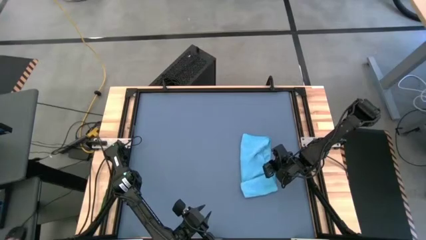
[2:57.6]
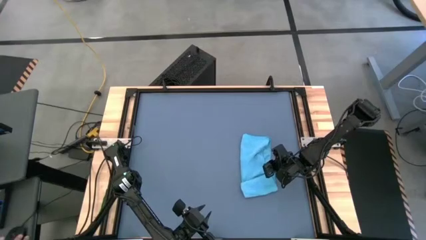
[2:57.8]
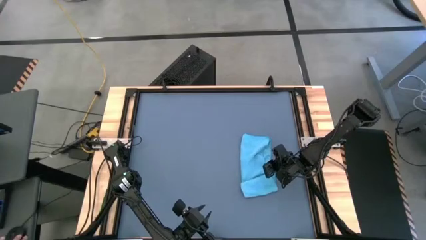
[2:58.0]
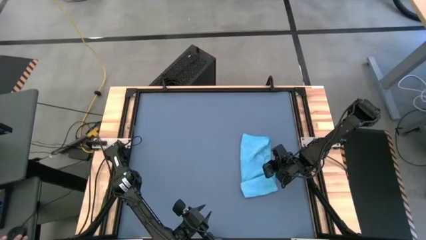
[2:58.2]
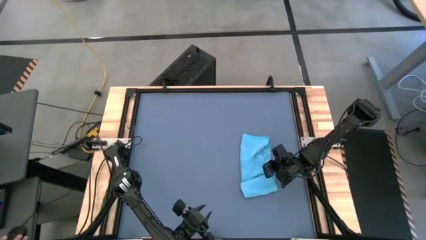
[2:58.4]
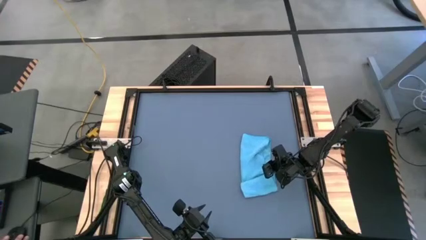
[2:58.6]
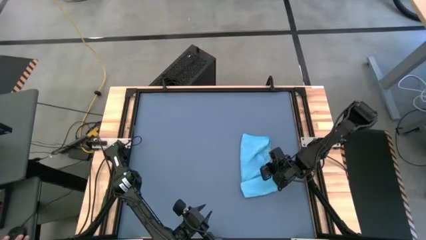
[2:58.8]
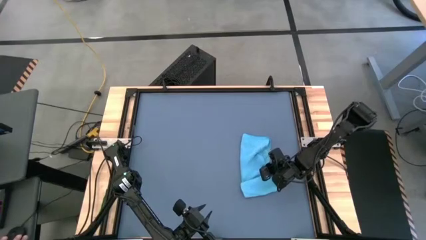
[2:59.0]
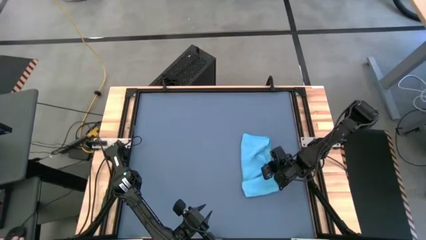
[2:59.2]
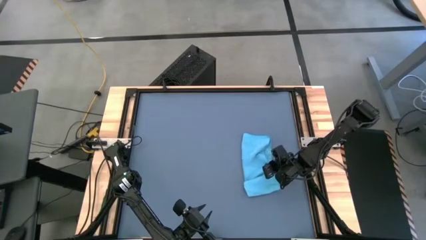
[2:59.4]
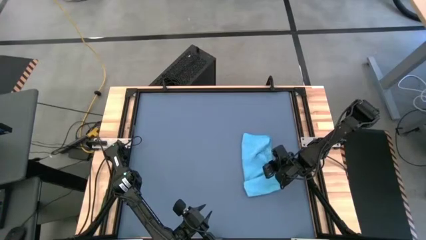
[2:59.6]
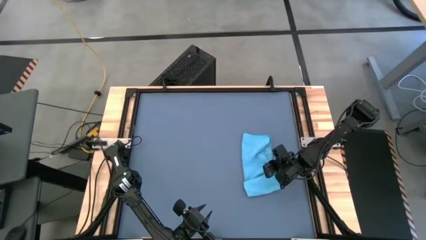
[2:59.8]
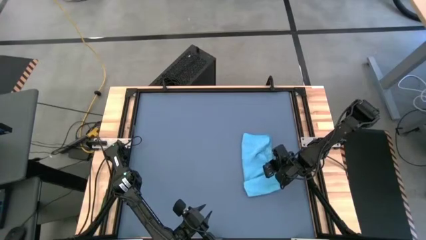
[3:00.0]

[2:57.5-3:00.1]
Task: Roll towel
Roll the blue microfiber towel

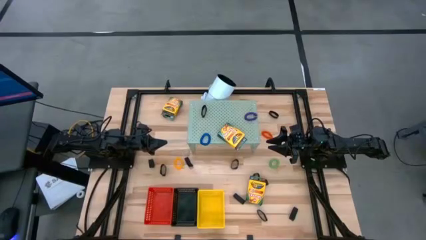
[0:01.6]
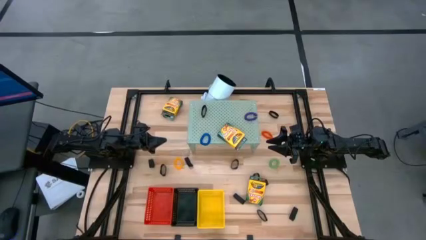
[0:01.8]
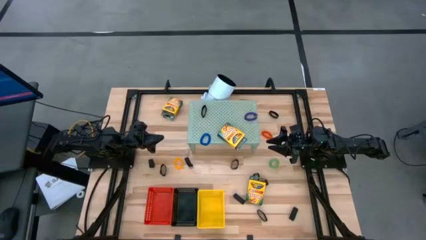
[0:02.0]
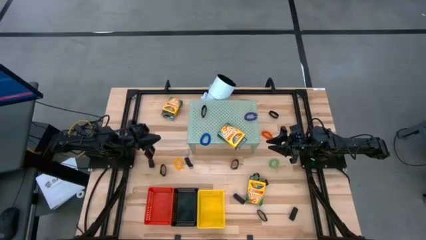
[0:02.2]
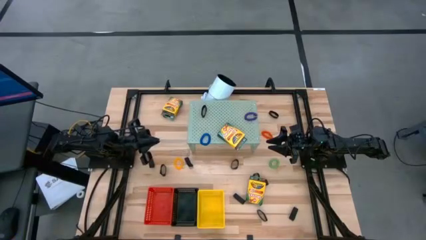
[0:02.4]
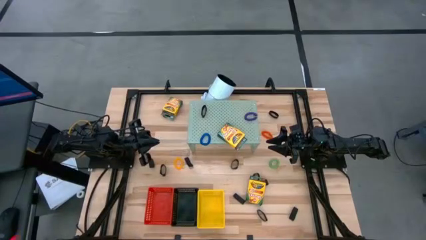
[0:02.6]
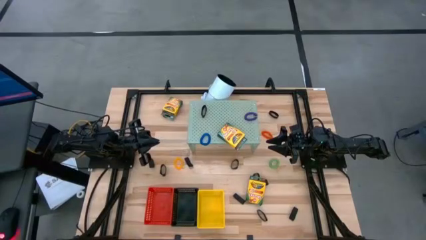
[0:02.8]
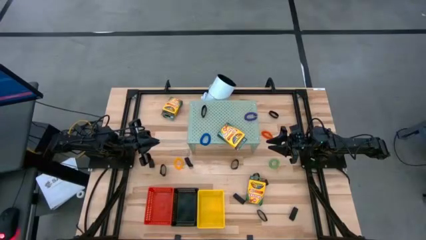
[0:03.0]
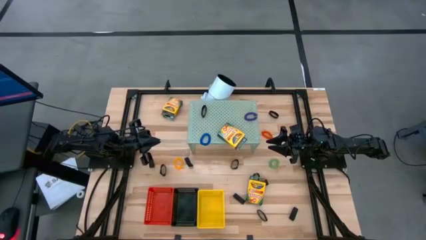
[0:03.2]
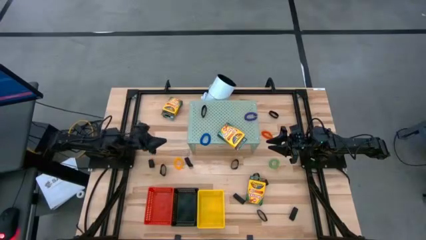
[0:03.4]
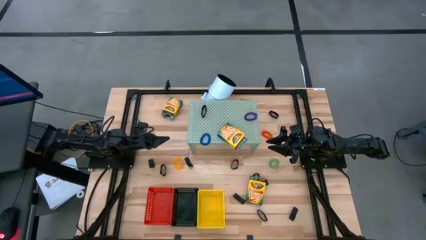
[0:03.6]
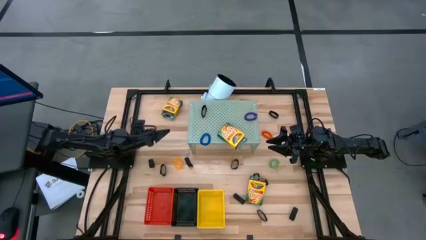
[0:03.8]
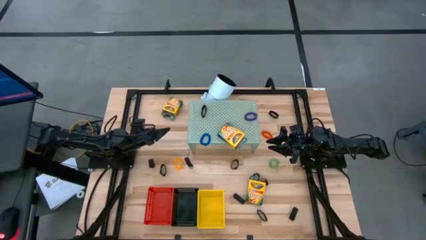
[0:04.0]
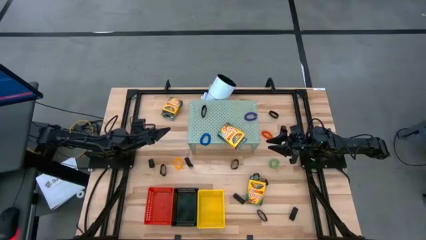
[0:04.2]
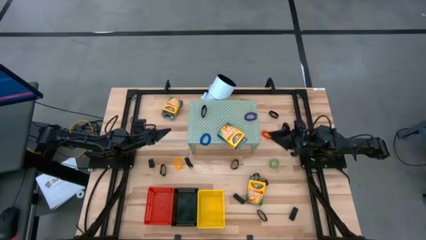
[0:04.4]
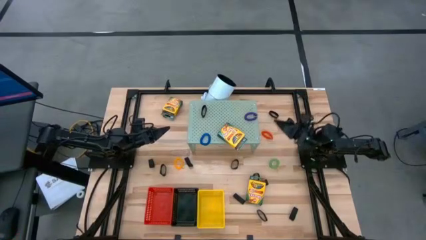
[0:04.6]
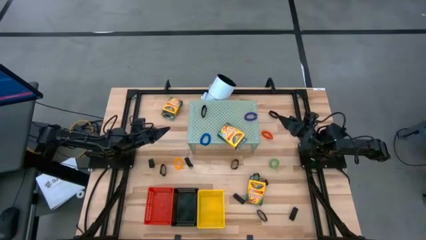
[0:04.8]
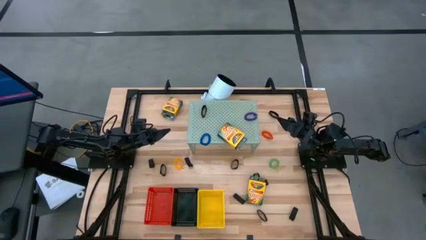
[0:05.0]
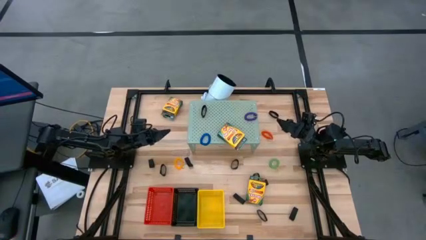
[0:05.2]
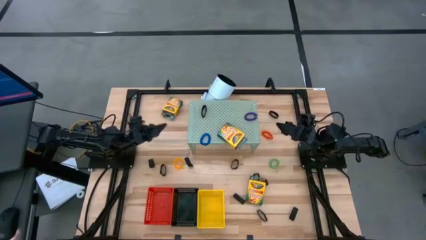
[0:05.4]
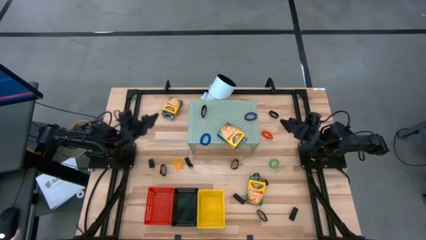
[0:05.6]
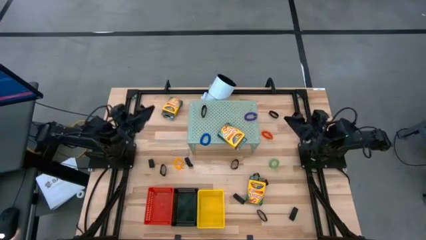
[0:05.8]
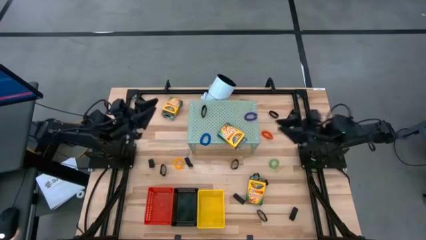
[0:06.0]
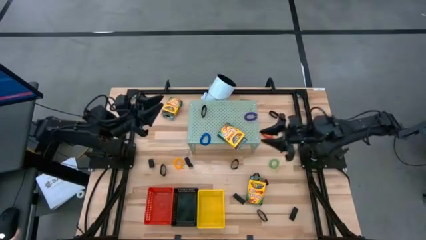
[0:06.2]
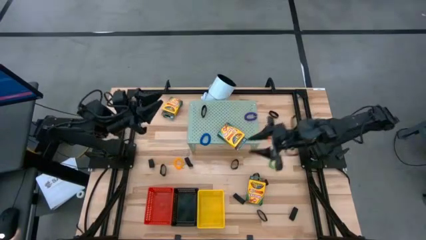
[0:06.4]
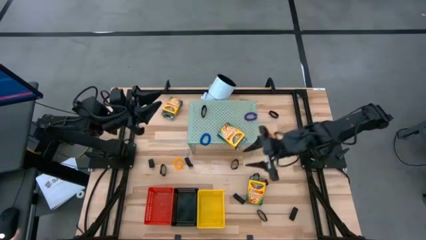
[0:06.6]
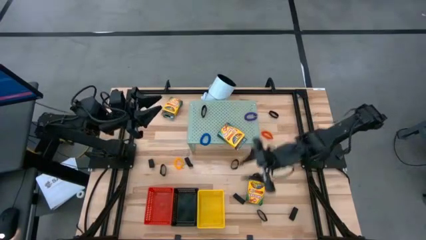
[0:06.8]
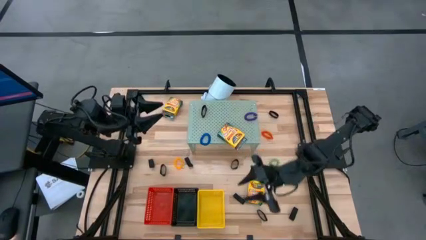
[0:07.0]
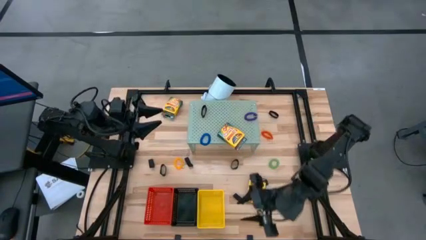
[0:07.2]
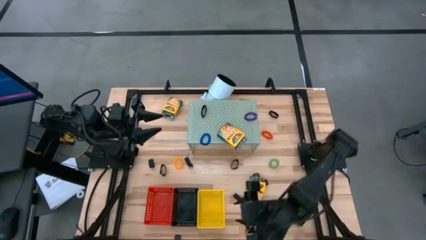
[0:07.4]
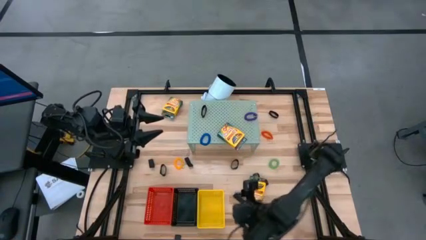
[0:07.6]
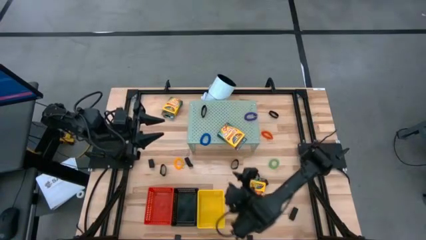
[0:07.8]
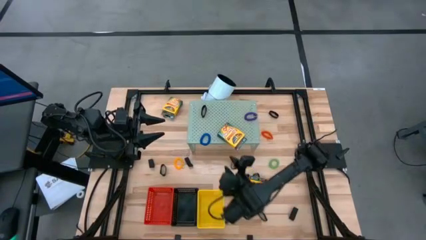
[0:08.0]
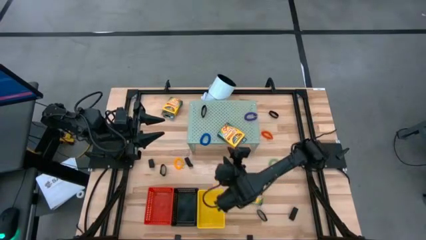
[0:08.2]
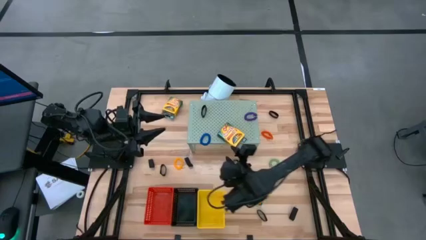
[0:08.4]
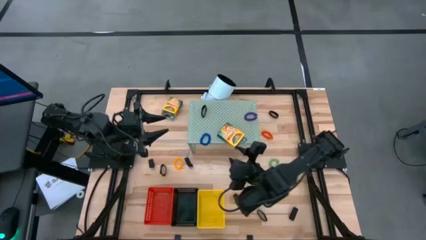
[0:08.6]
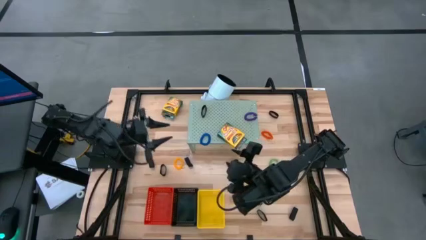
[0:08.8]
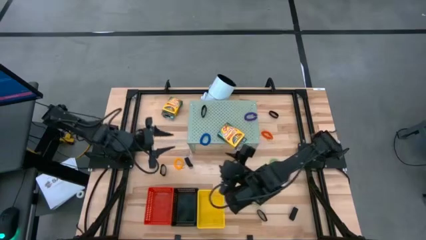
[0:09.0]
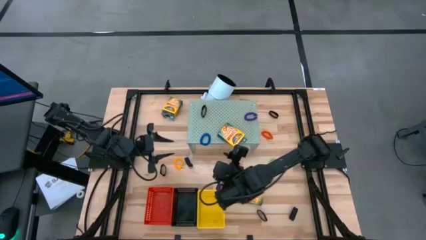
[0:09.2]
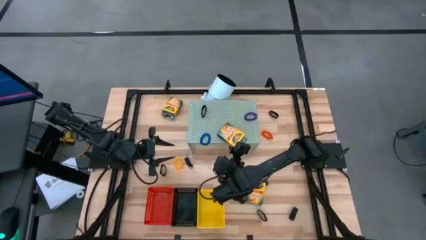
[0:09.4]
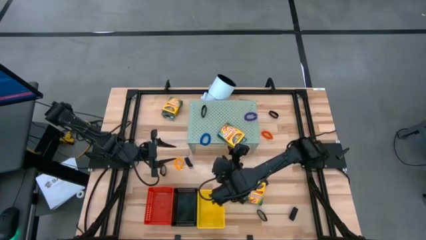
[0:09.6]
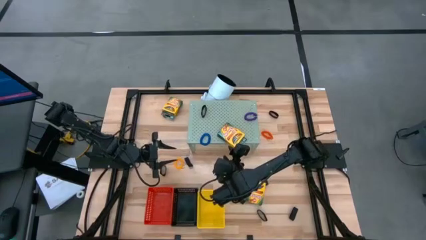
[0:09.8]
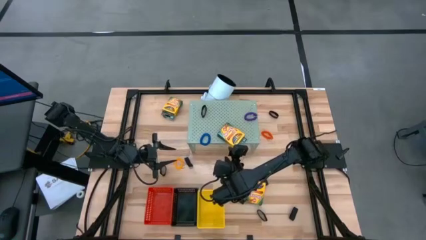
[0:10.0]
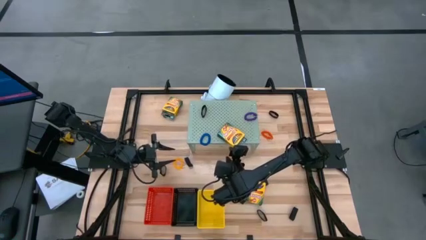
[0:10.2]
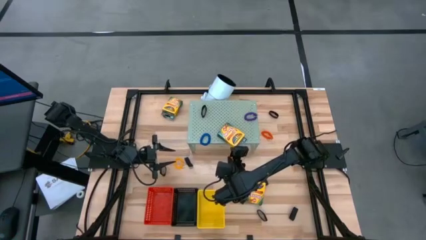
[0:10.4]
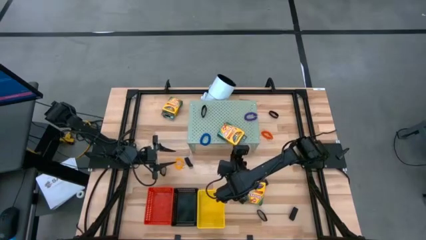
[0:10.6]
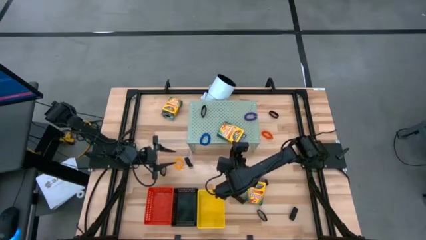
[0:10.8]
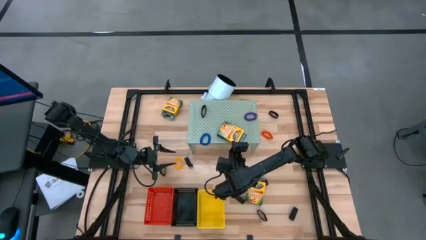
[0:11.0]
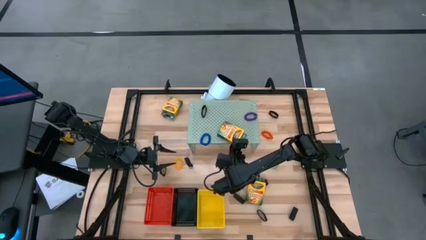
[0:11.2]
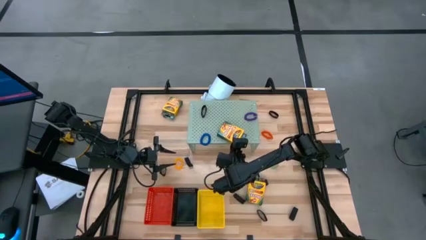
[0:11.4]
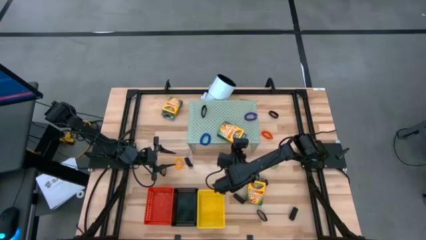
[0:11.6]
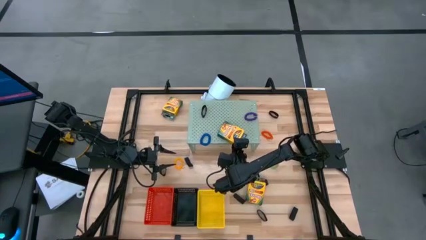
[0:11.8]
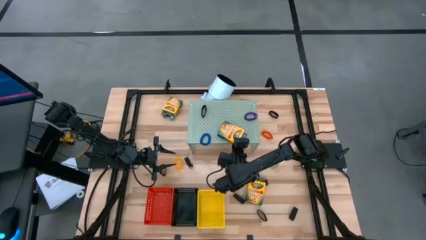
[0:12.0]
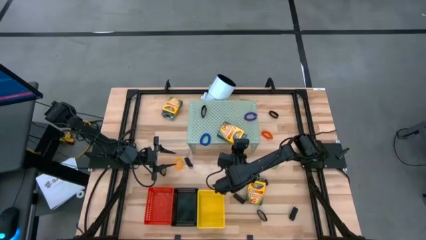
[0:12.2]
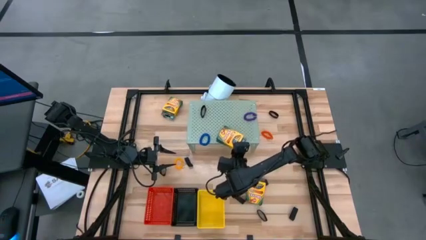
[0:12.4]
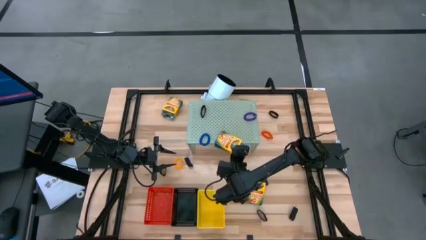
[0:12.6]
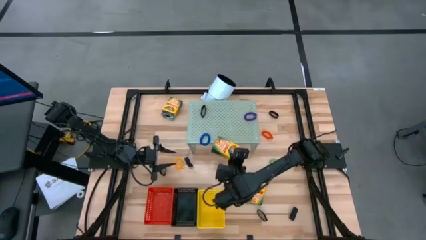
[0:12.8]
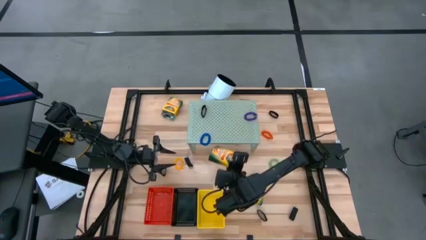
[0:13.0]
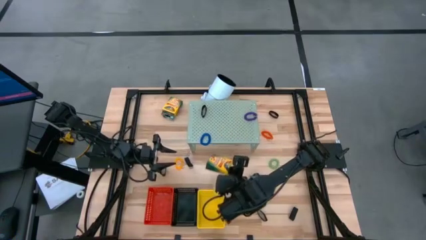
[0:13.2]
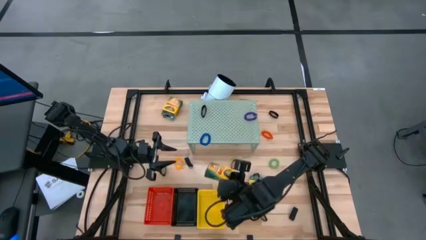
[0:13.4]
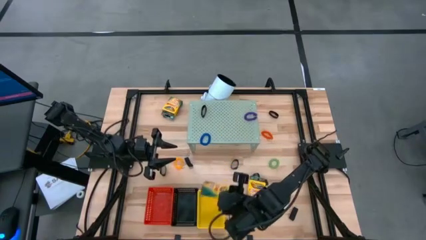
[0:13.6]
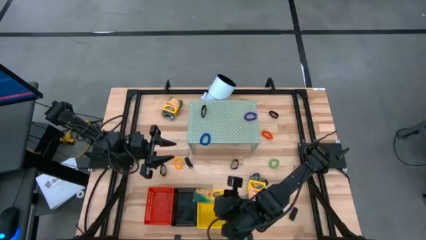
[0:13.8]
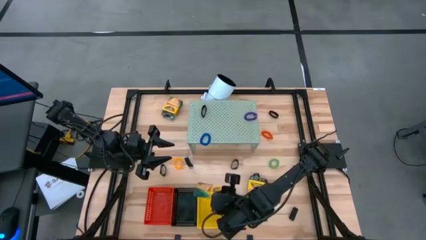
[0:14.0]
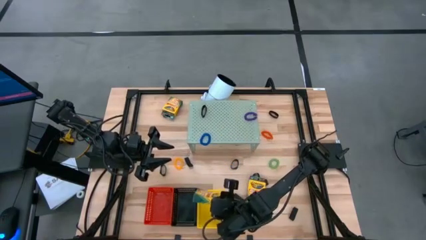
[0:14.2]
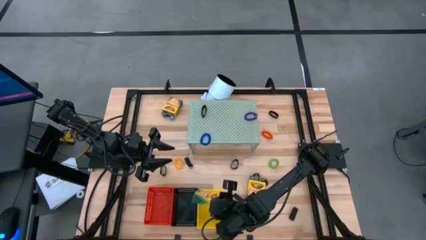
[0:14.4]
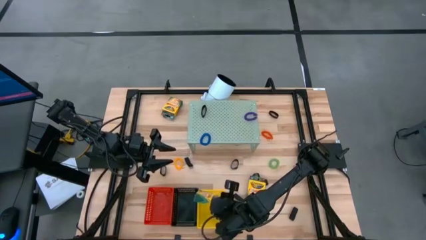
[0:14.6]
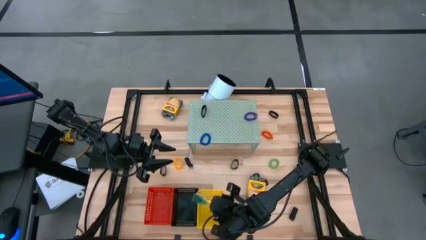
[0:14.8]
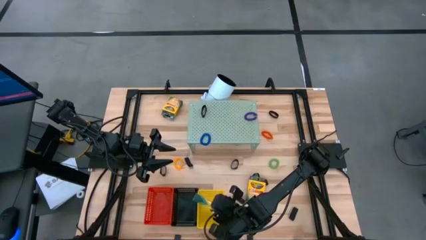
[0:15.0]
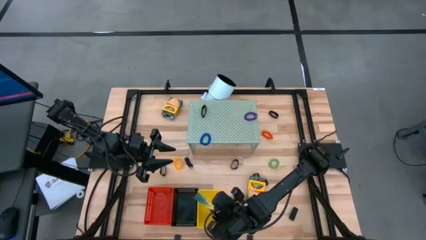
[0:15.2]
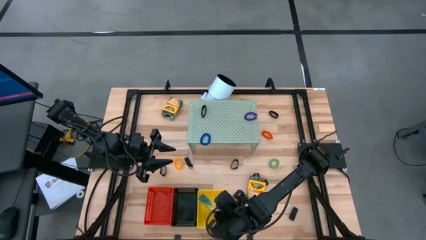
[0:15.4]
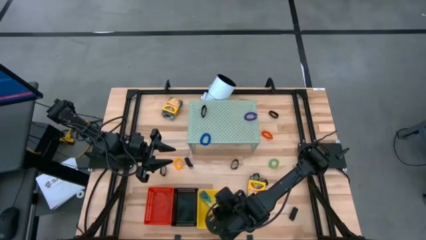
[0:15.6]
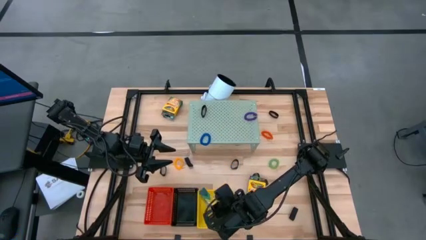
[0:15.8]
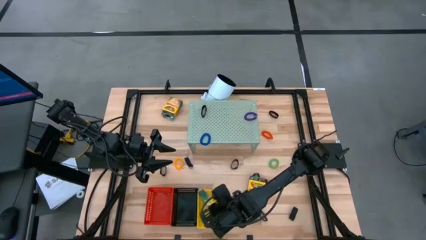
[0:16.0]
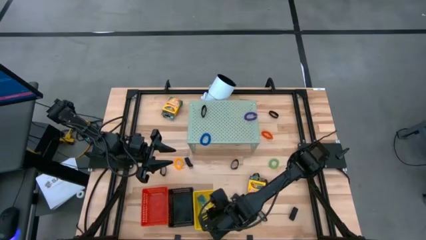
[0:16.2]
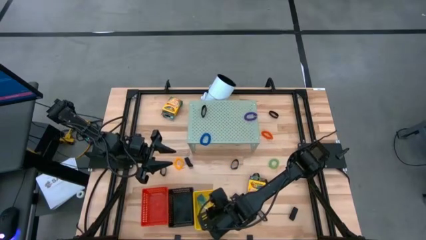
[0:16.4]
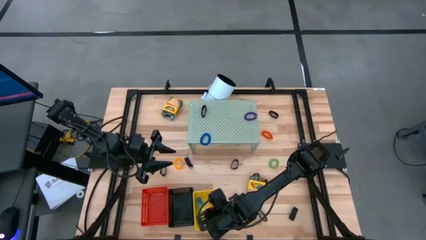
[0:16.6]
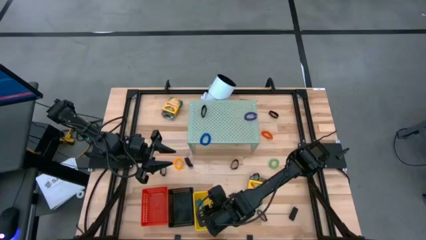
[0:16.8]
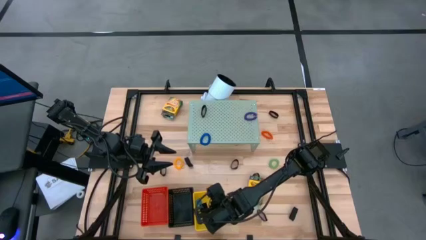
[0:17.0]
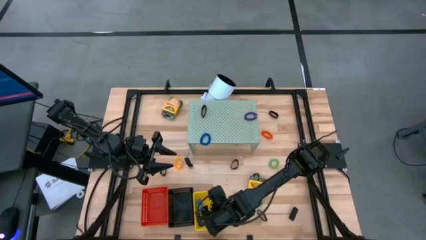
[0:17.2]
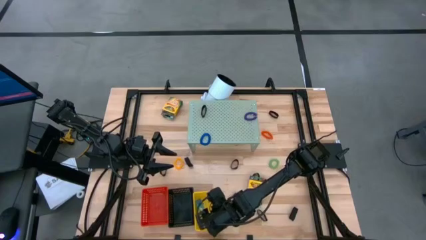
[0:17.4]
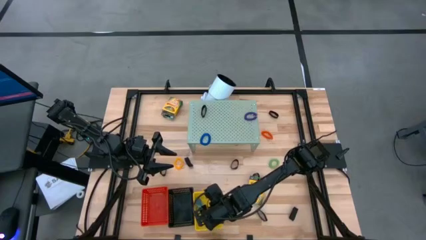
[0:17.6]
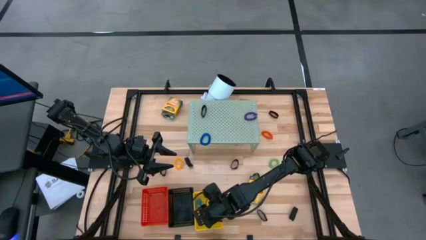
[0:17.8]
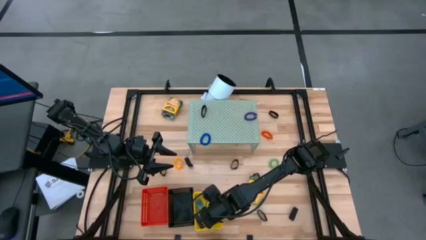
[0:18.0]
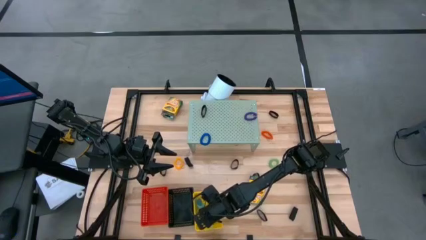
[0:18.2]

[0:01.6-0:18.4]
Task: Pick & Place Office Desk Supplies
Put the yellow crayon box into the yellow bin
